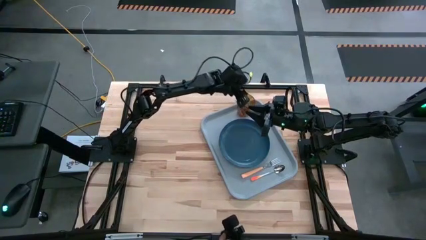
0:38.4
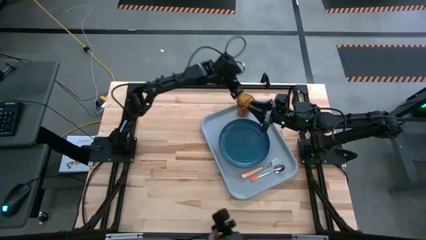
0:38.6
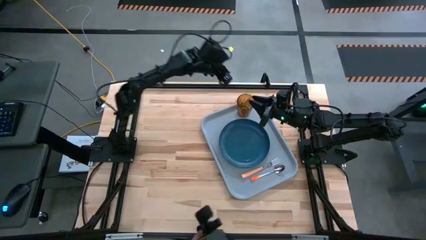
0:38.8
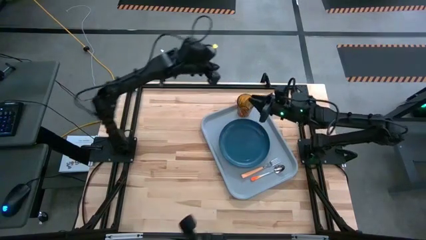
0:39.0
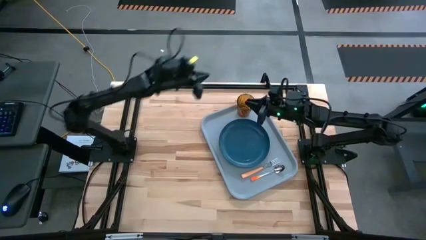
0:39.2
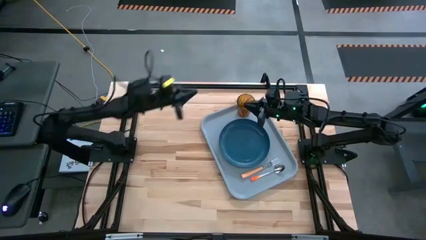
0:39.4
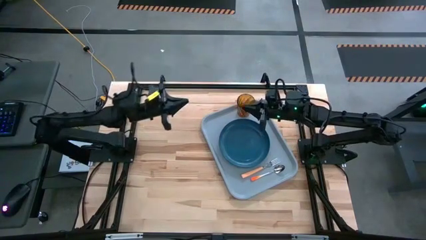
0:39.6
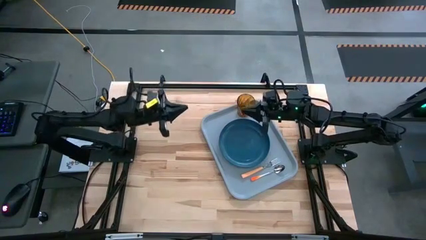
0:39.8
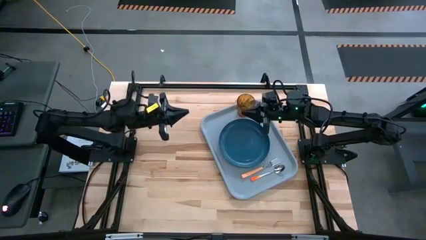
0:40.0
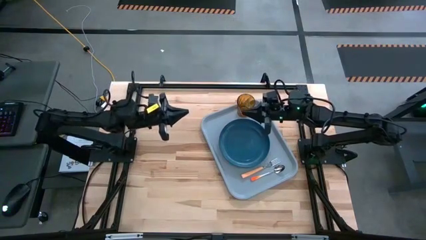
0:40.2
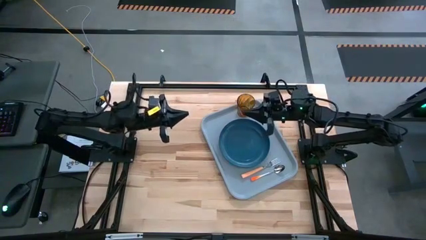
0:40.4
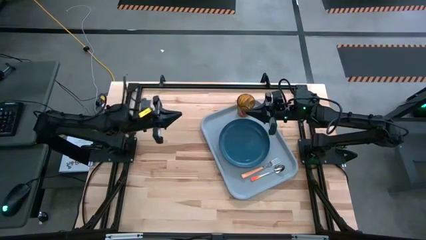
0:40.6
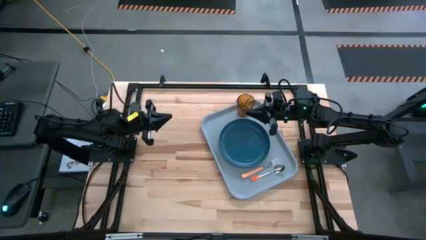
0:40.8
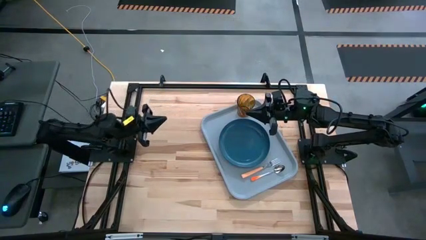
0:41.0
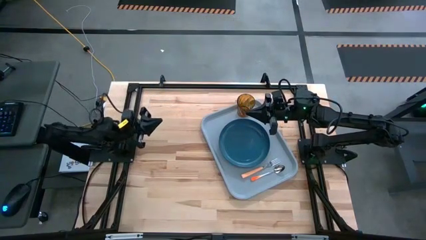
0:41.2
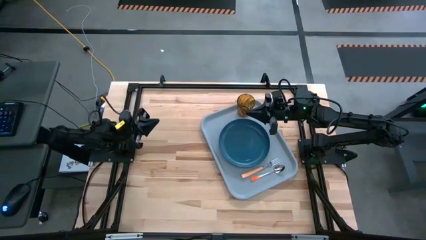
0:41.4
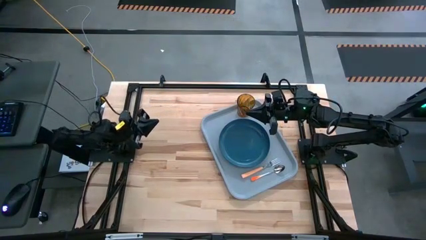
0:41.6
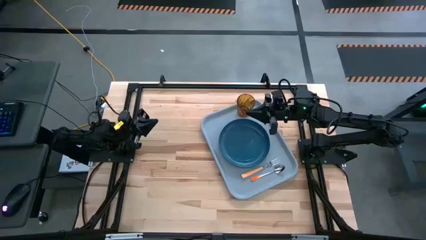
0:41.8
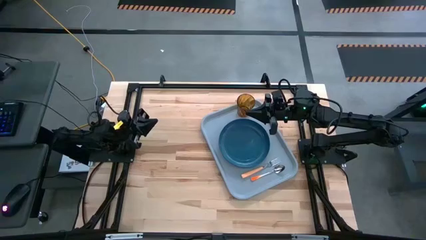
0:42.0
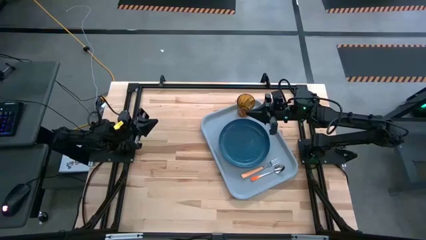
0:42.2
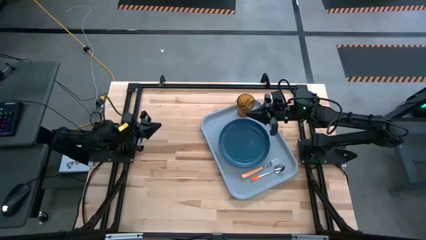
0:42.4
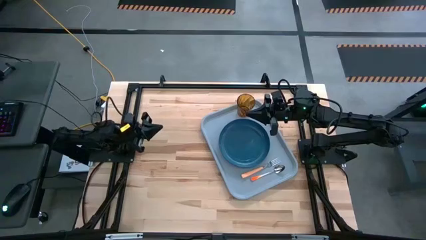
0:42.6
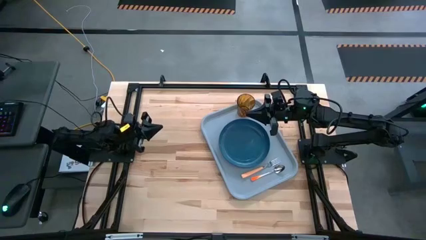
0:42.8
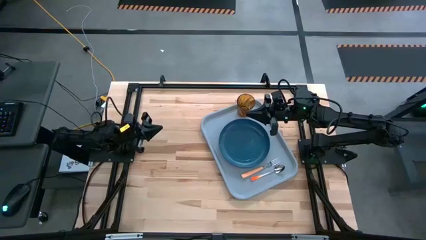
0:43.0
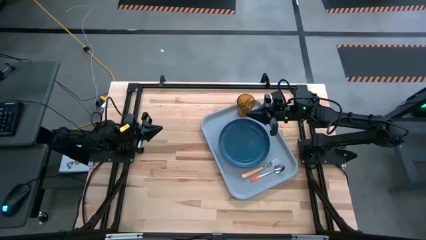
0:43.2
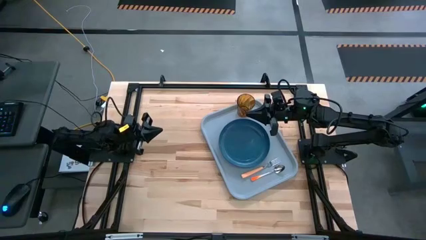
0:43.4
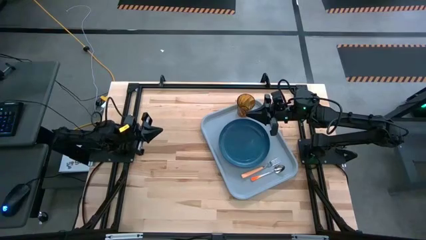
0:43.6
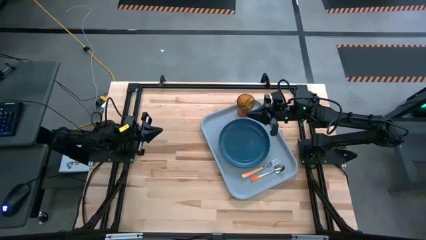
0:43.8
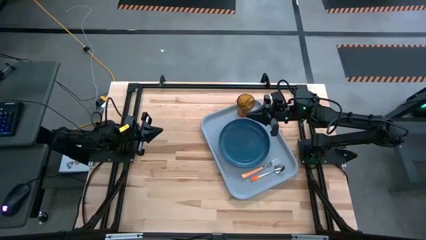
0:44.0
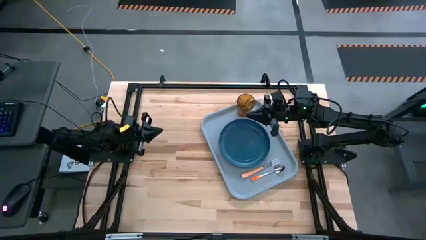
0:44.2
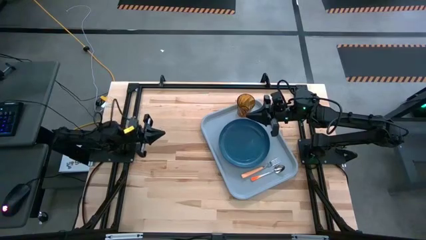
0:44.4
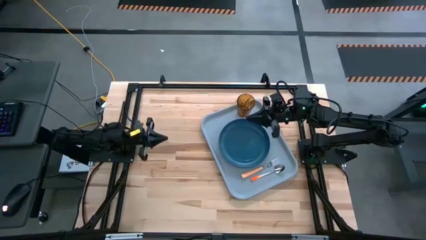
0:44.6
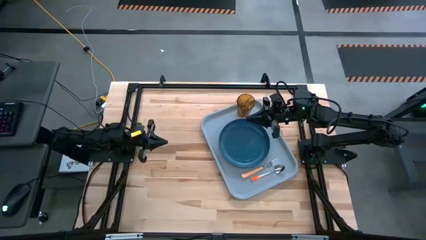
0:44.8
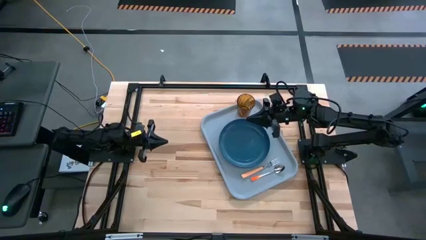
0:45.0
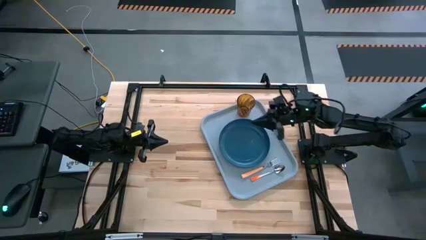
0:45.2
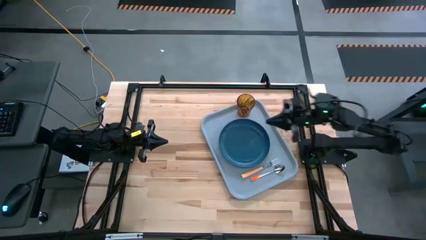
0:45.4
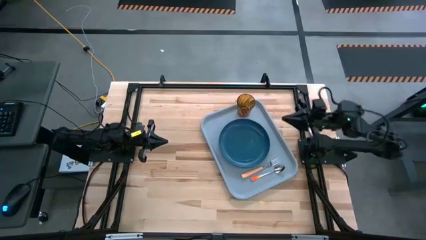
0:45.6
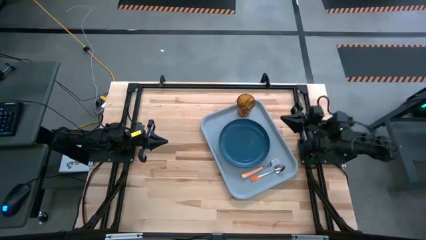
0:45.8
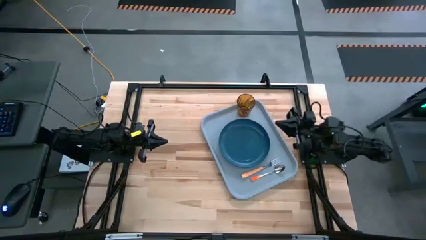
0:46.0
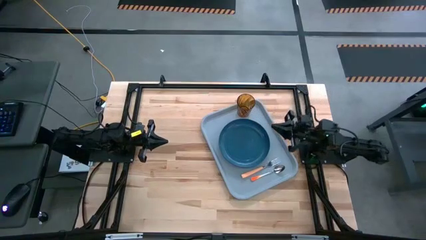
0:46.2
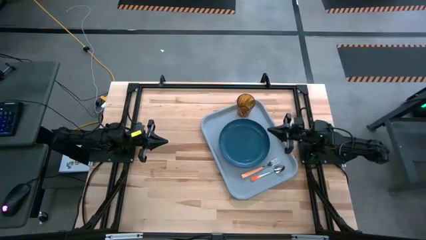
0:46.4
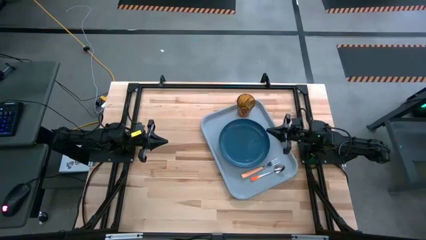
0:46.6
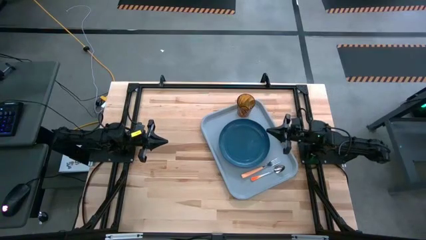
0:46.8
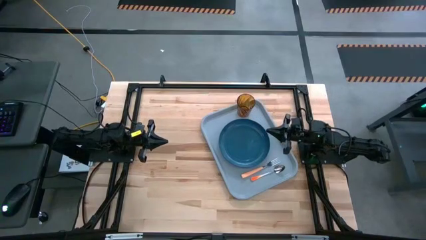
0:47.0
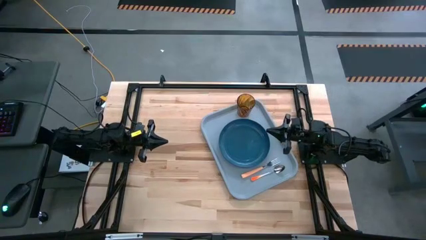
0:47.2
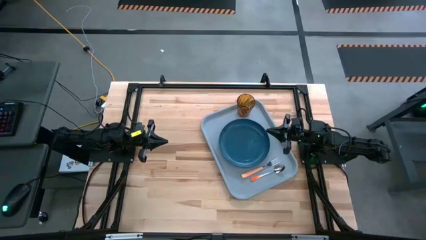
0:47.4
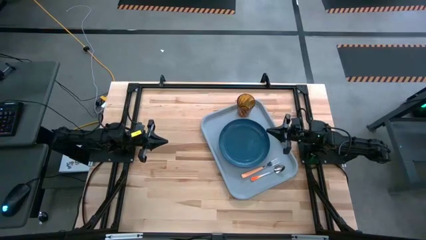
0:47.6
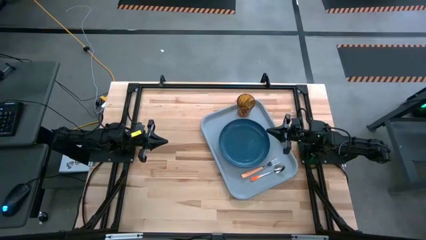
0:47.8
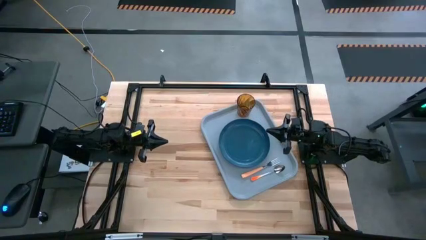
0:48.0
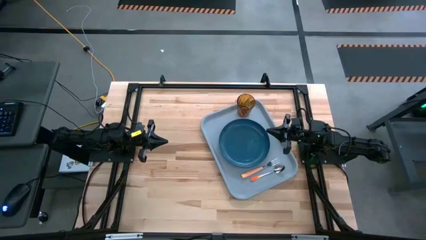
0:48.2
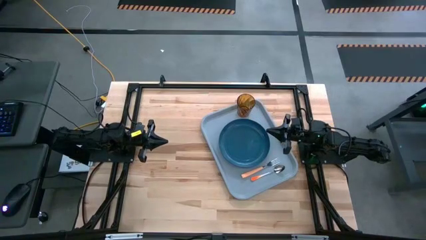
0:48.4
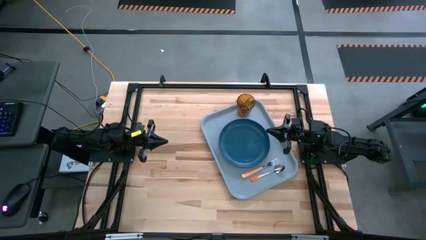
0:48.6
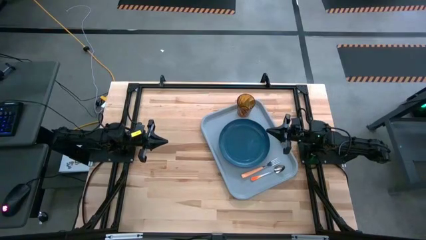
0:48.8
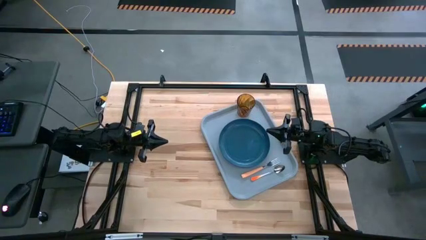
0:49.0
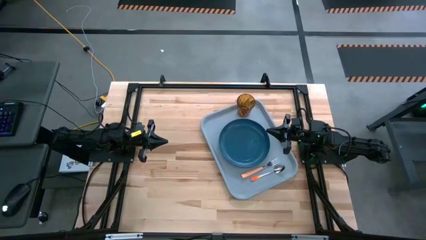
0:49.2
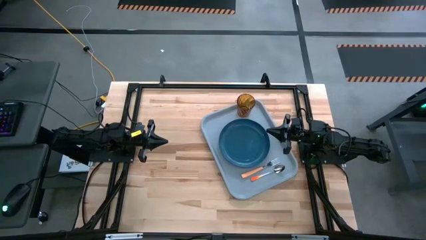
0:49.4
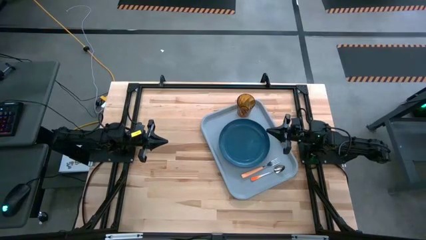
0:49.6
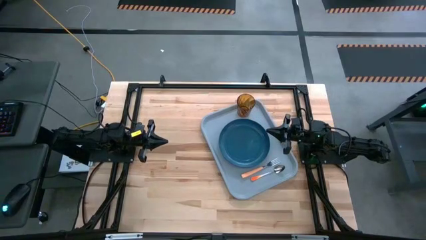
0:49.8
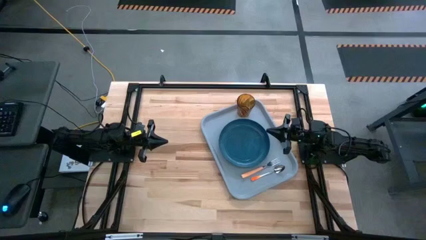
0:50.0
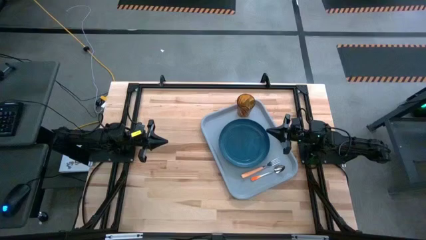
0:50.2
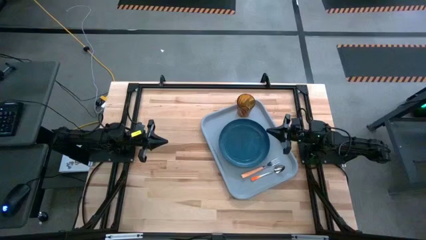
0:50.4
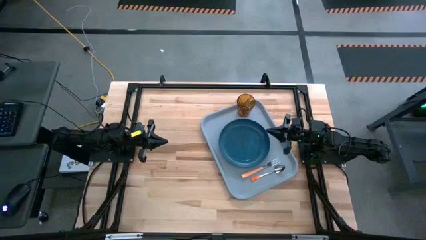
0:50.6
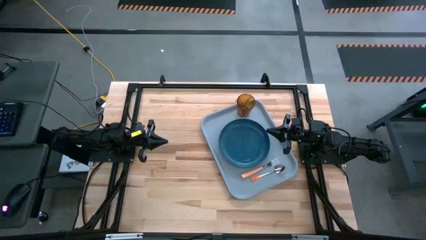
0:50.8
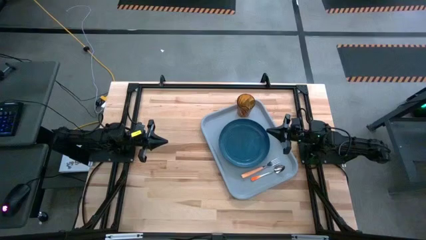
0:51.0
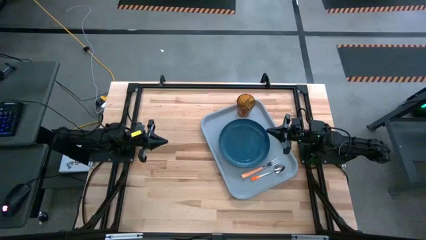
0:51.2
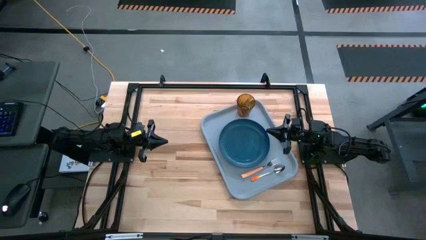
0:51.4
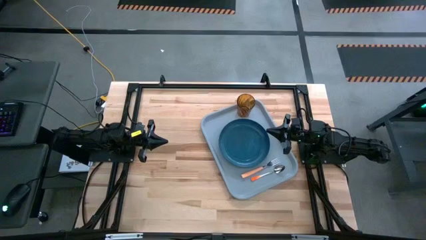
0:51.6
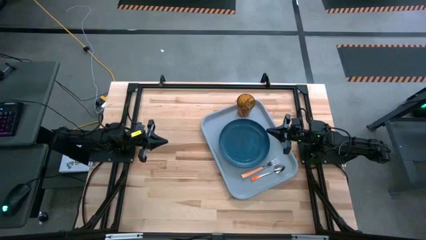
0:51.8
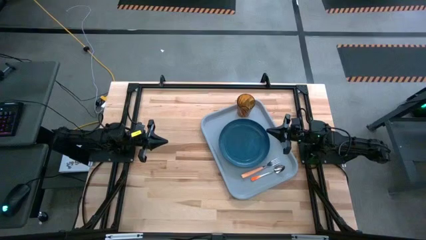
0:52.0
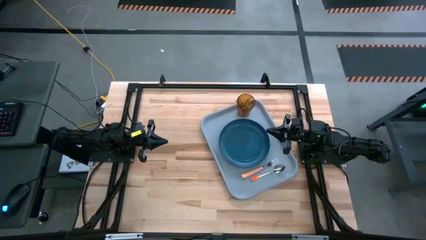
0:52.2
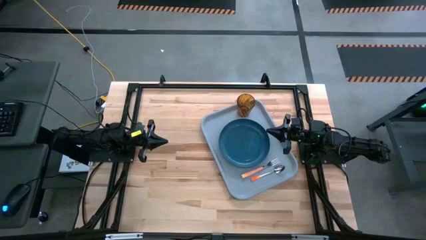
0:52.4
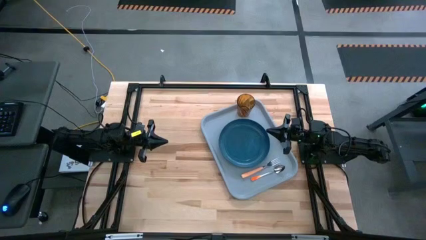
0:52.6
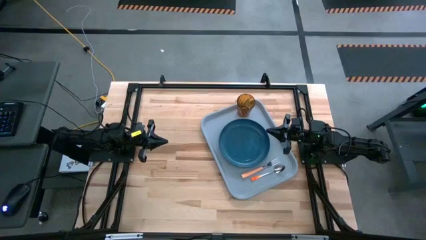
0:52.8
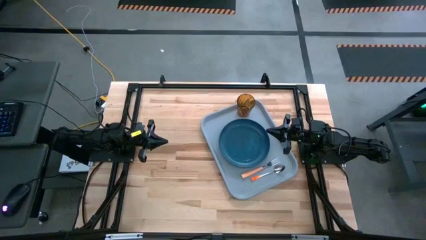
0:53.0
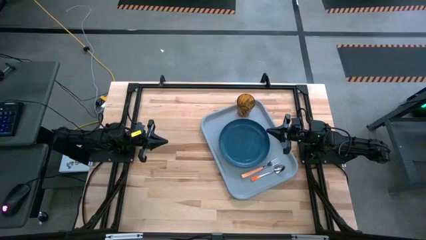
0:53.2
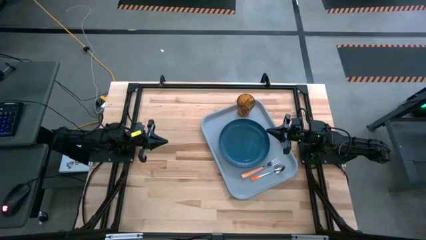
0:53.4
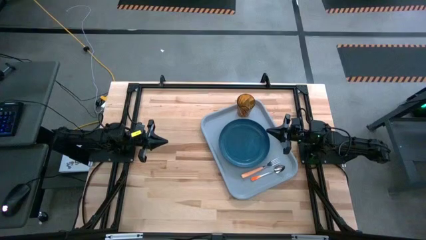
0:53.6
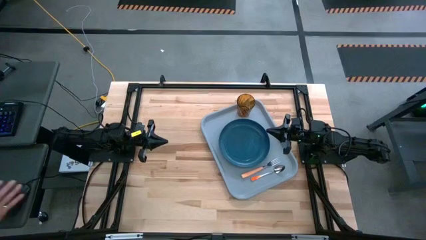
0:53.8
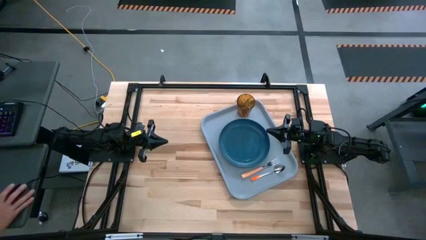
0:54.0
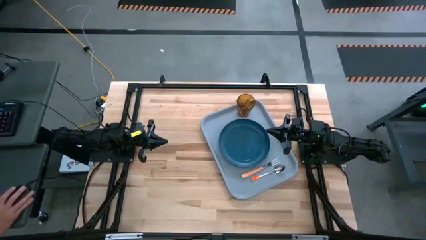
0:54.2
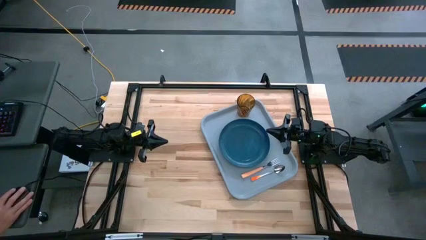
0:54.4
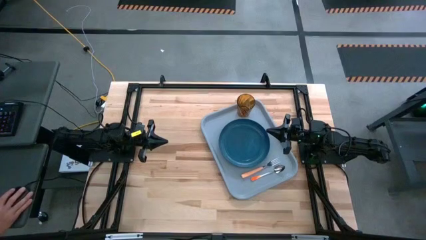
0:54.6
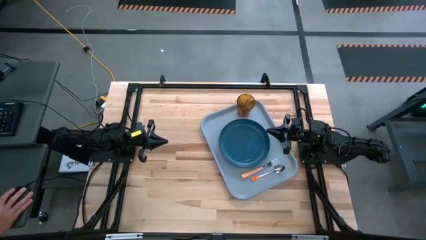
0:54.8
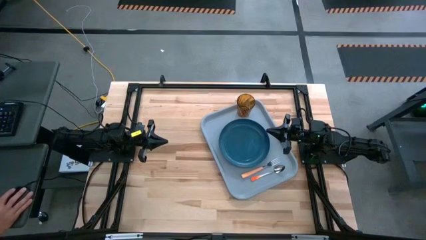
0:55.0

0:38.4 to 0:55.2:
Task: Pick and place plate/cup/fork/spoon on tray
Return to Home Position
